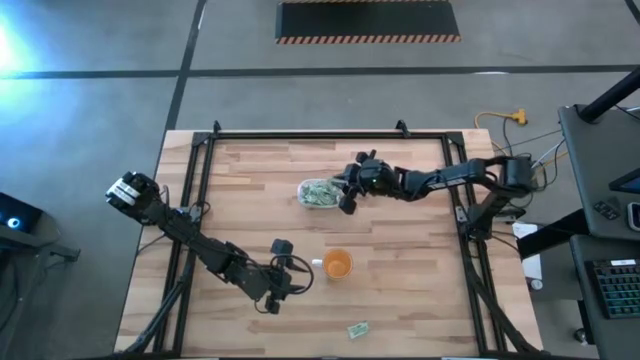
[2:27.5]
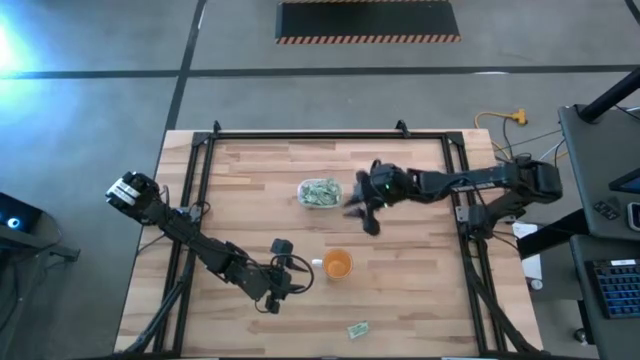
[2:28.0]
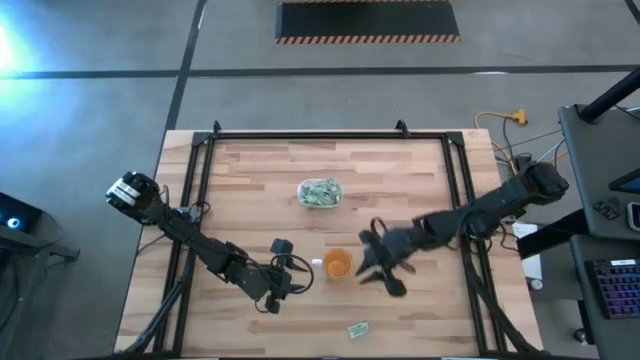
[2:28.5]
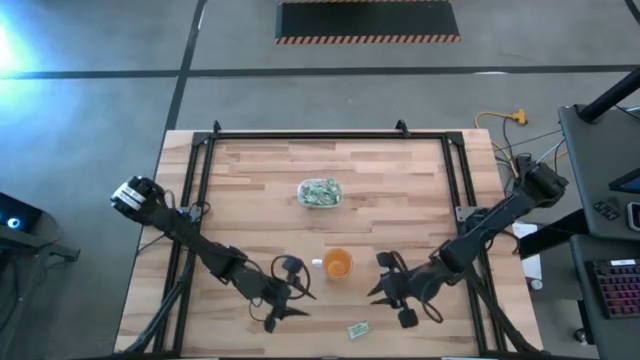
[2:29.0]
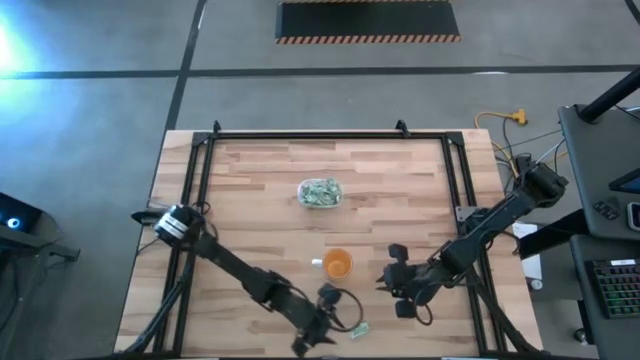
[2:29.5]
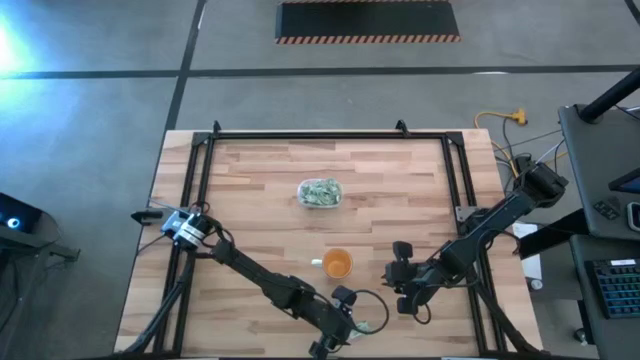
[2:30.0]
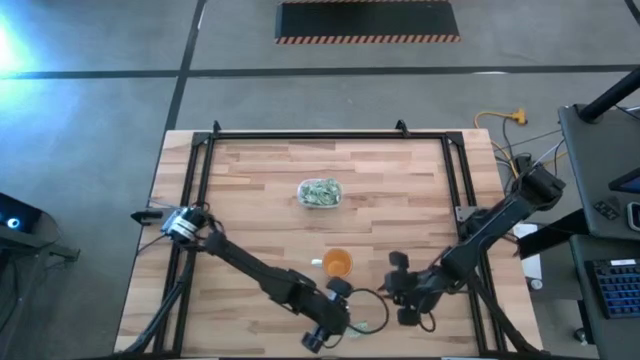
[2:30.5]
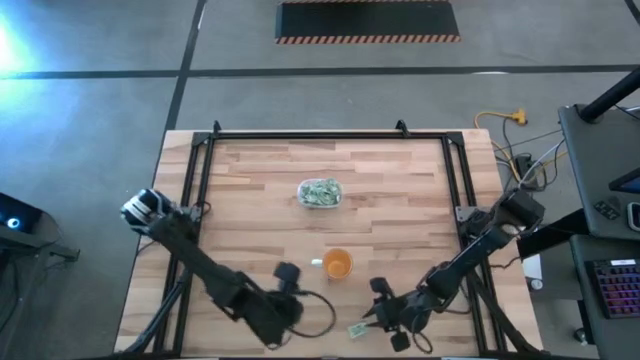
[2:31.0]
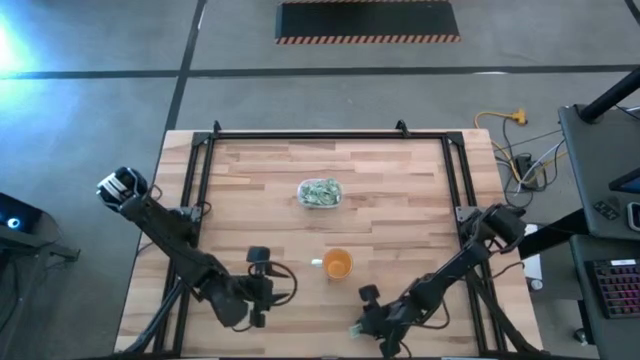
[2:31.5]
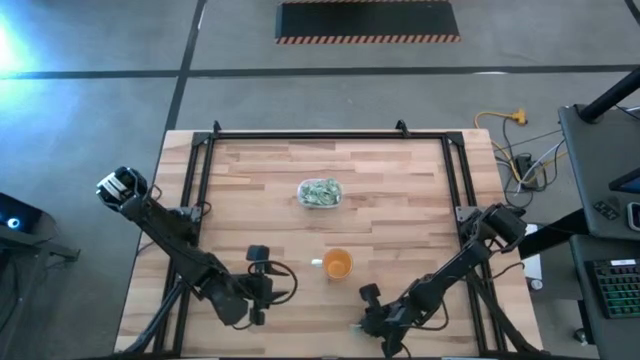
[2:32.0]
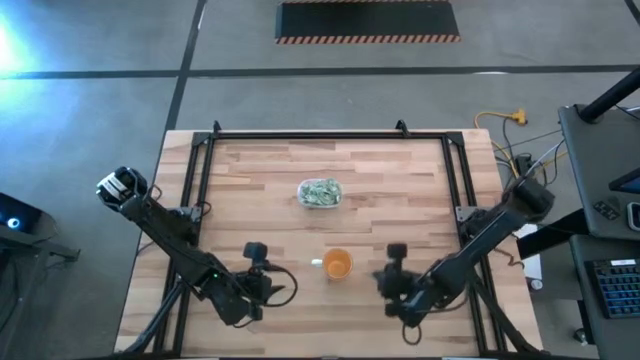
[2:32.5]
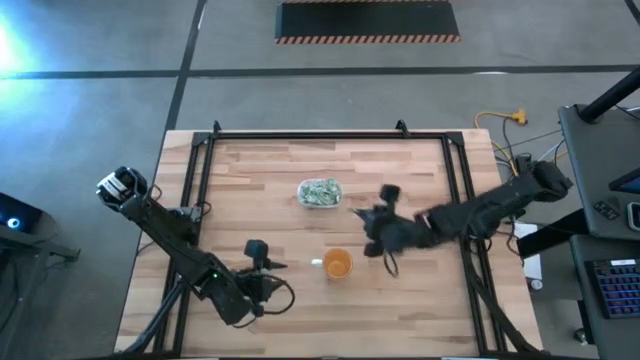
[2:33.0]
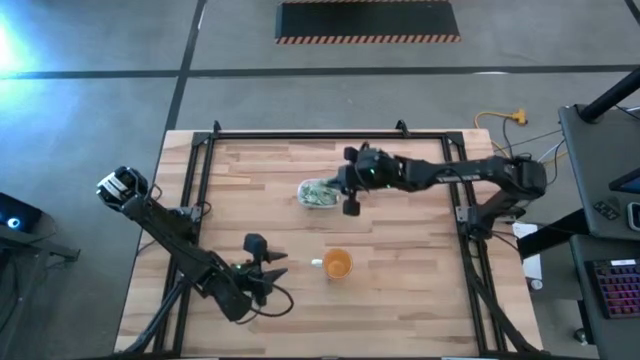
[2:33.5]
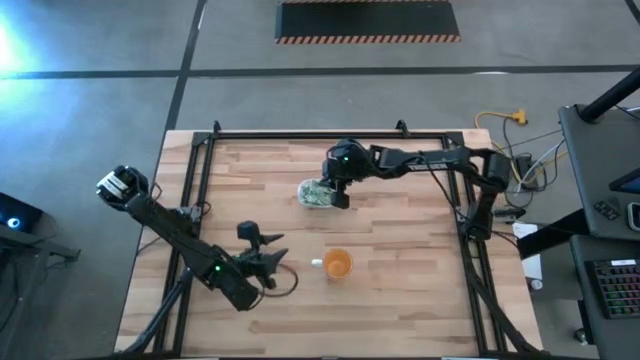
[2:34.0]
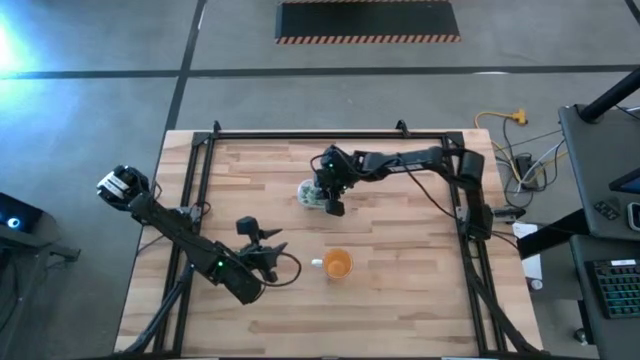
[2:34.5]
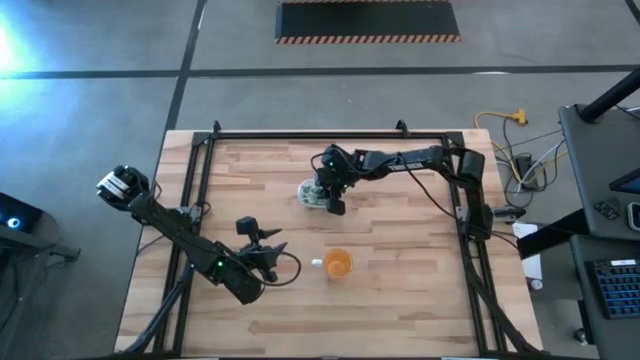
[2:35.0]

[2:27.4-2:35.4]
Task: Pick and place Stevia / Truvia into bins
Put the stevia packet into the transparent bin

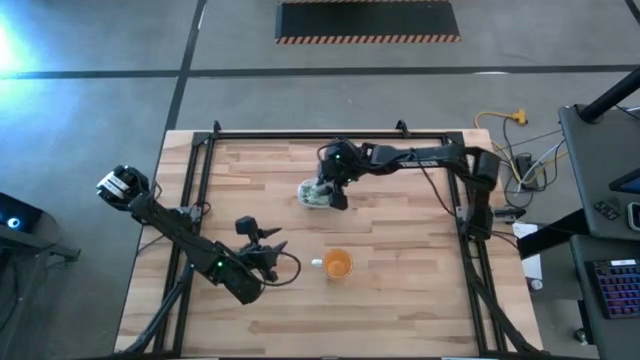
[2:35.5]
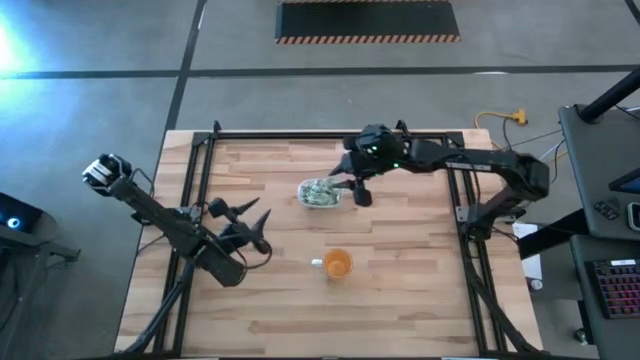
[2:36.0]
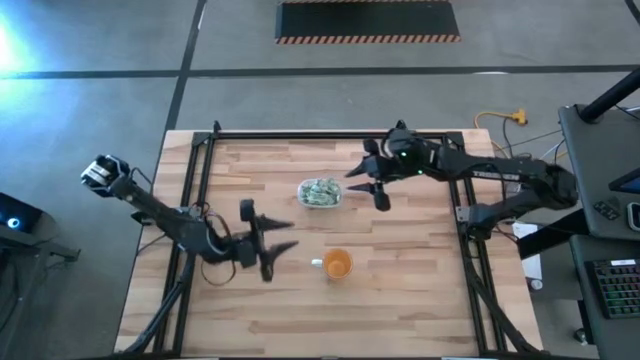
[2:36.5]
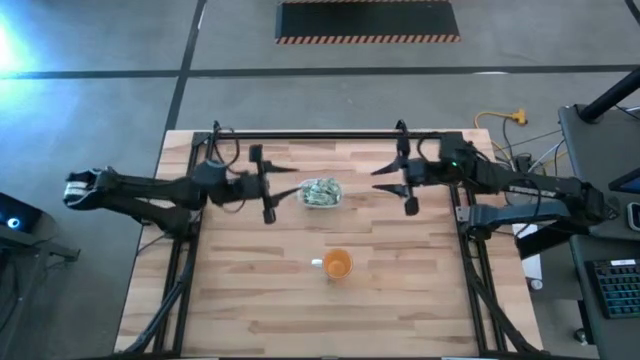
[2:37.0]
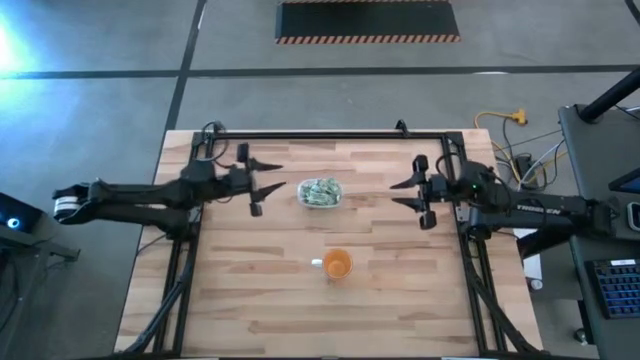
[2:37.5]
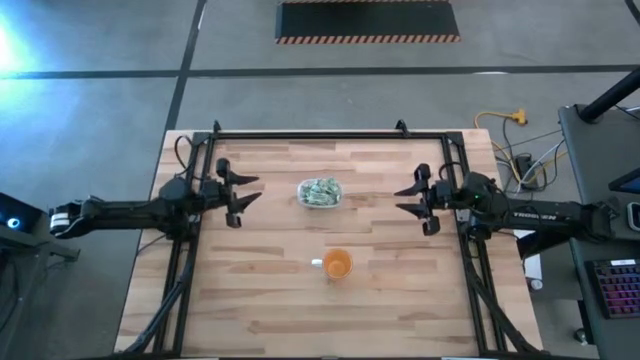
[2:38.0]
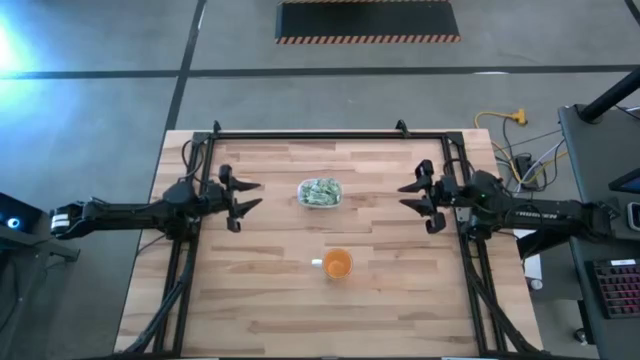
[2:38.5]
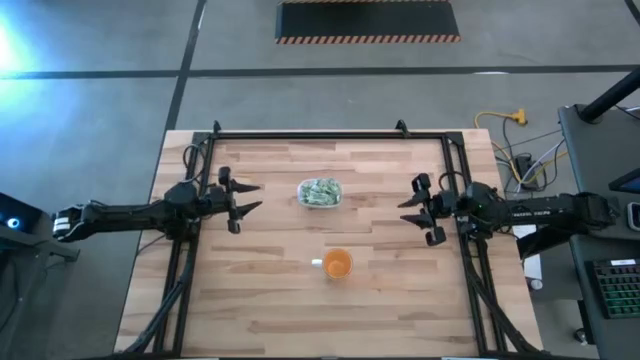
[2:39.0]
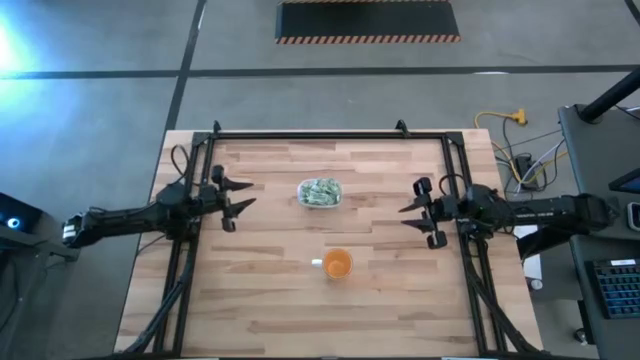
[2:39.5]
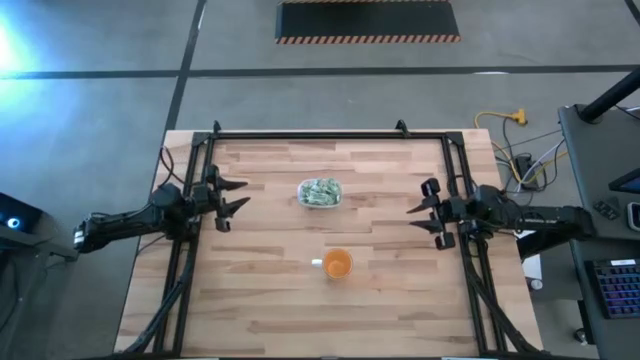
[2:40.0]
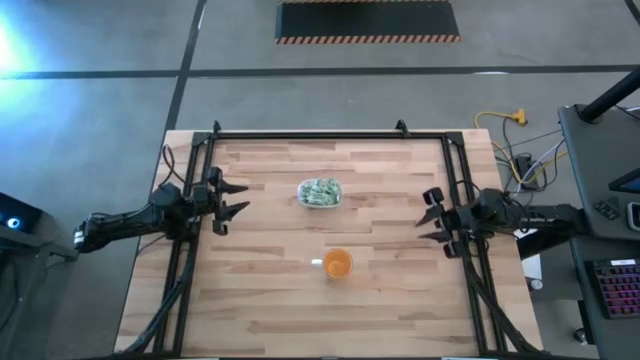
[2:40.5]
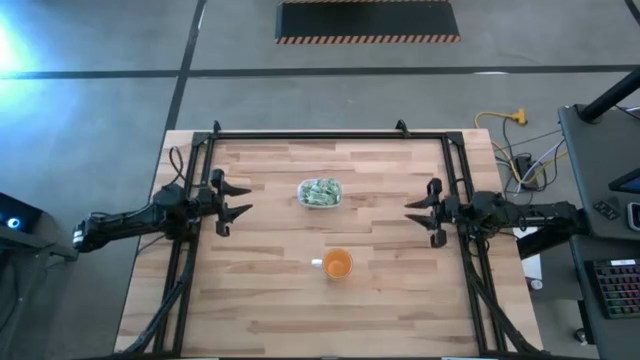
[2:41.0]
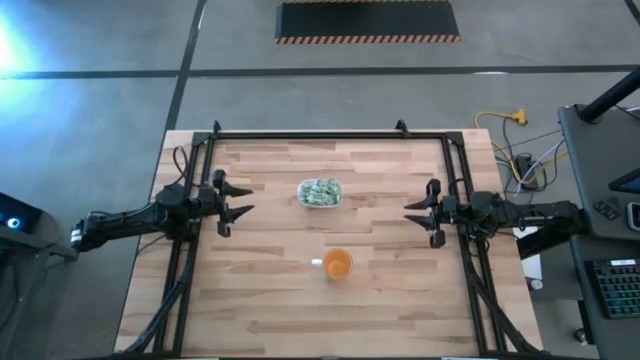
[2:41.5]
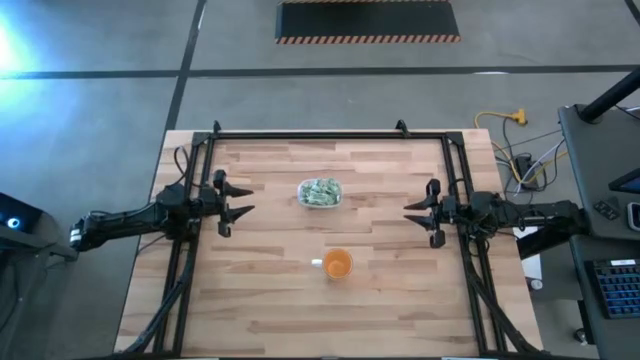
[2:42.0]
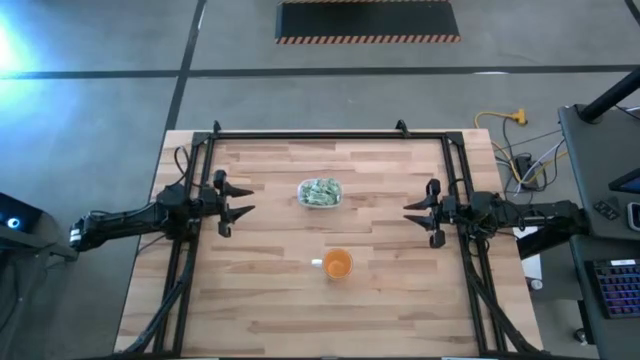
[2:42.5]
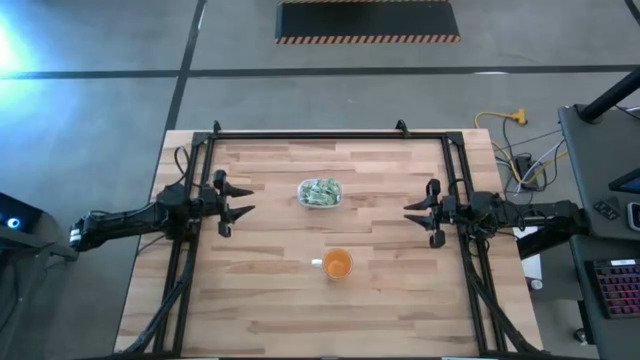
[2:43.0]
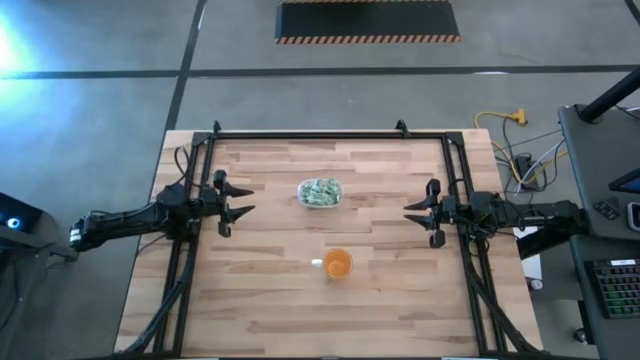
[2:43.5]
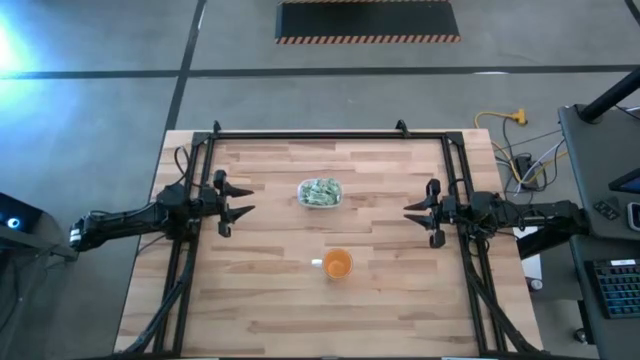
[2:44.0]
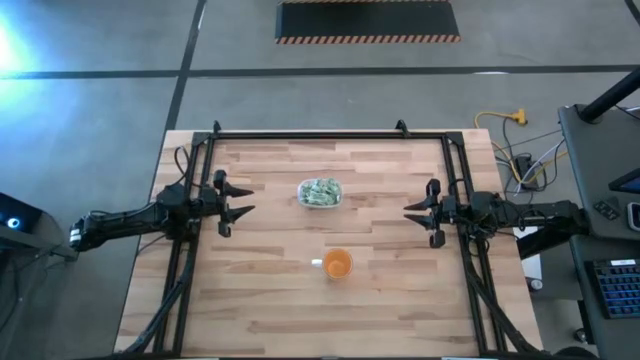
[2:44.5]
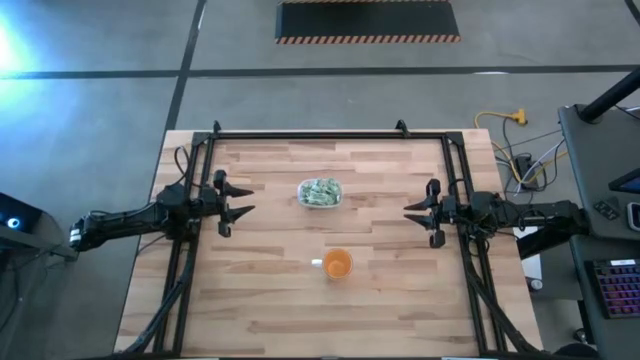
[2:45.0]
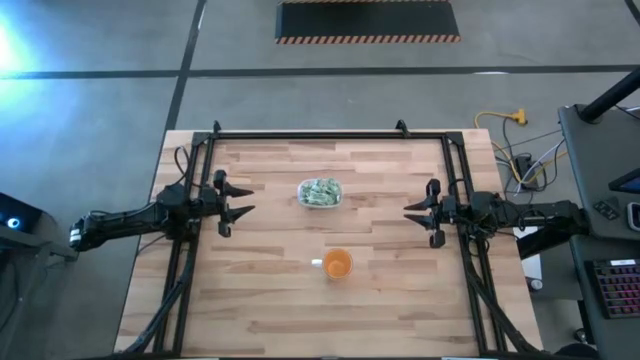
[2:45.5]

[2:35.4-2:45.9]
Return to Home Position

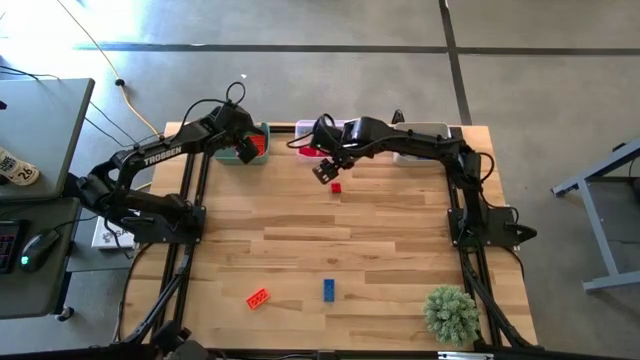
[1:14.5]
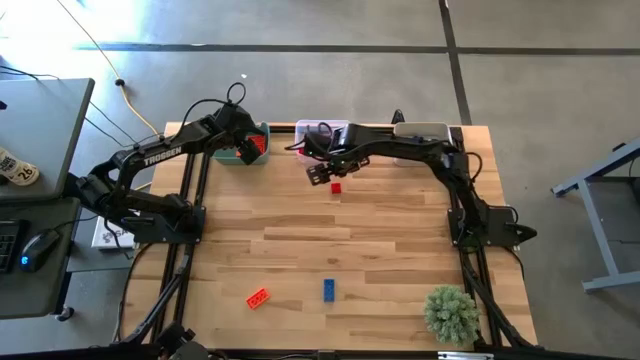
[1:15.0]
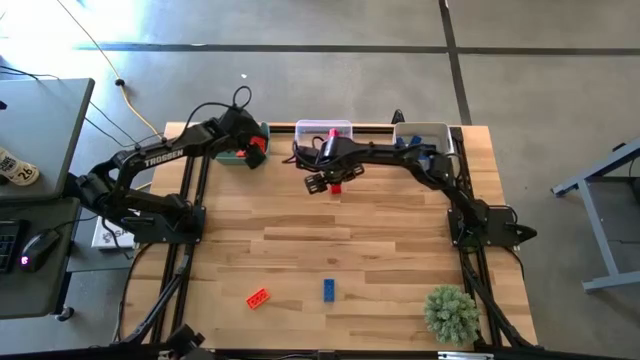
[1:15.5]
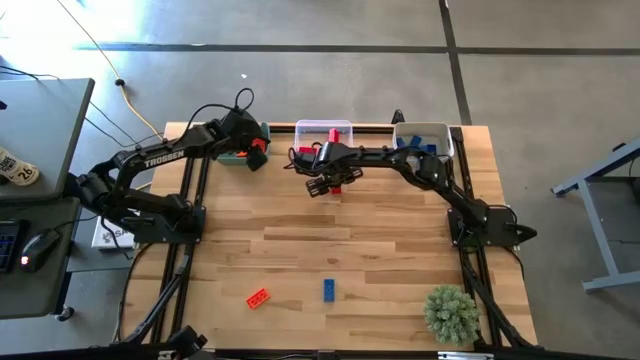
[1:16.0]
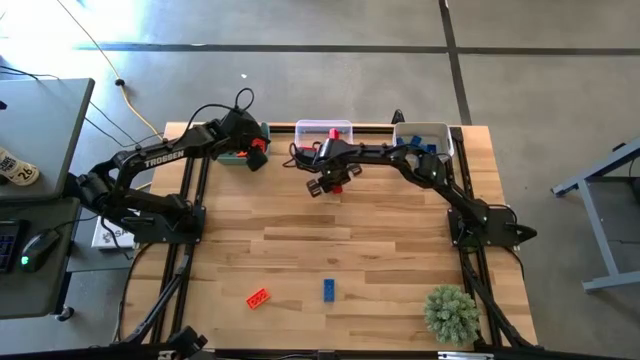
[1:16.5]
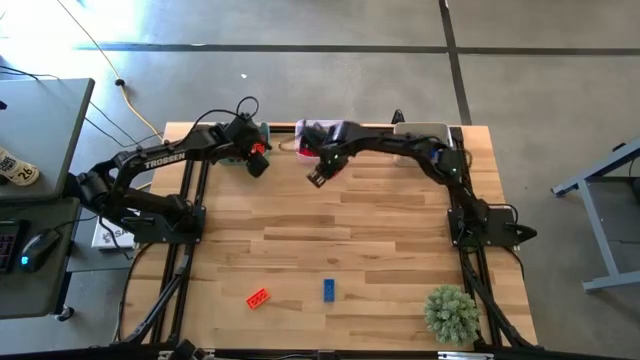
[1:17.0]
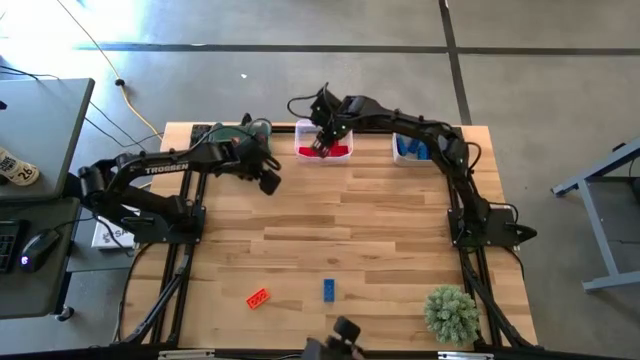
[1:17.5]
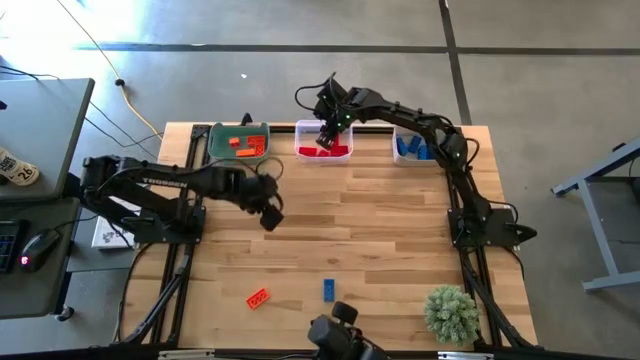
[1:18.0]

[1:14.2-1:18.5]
Task: Sort & place blocks by color
Put the red game piece into the transparent bin
